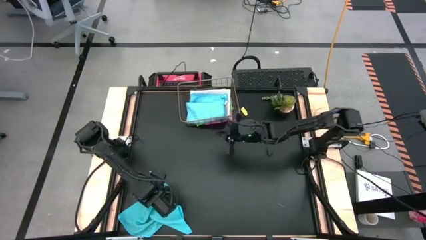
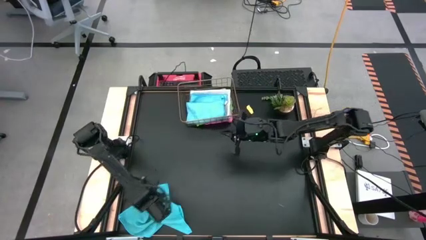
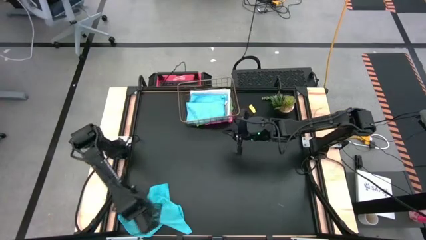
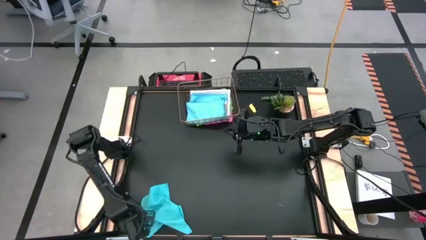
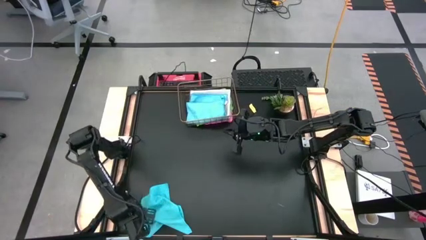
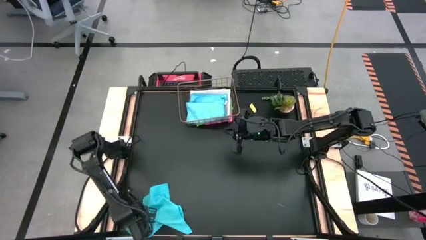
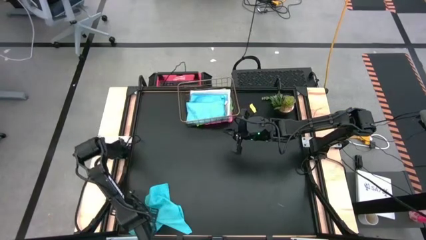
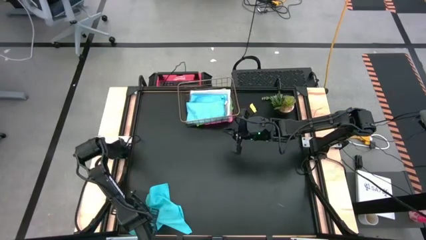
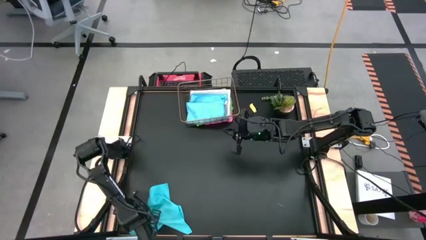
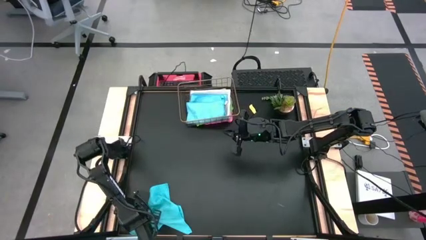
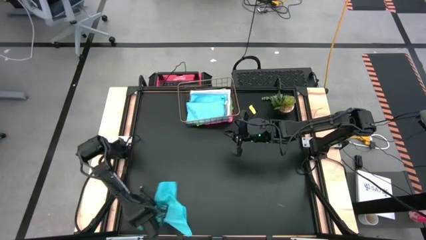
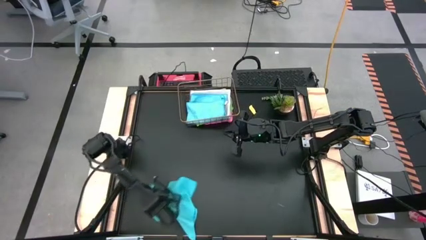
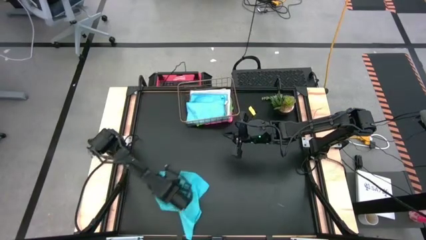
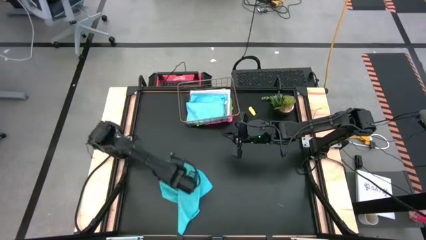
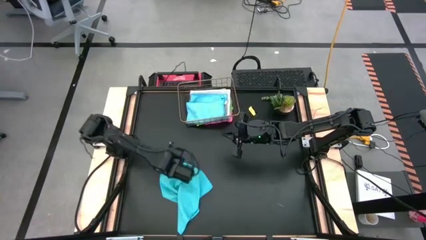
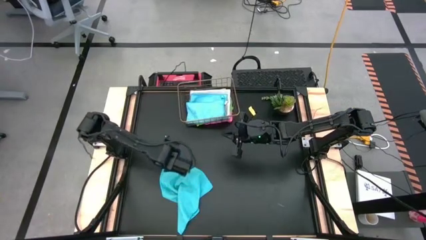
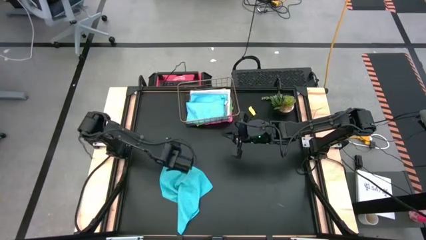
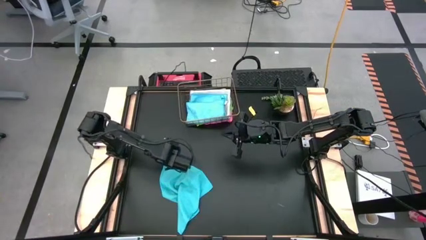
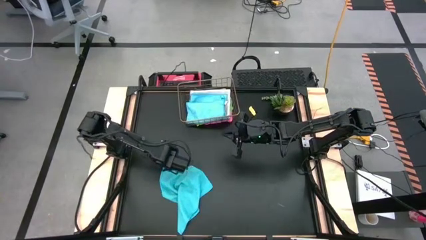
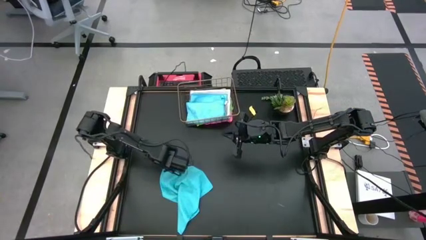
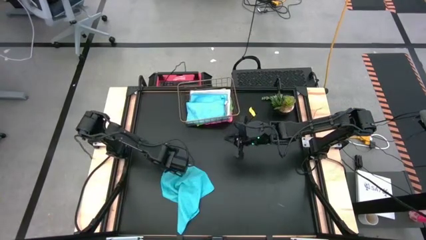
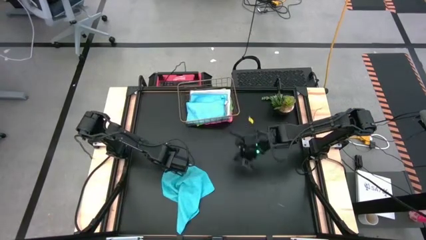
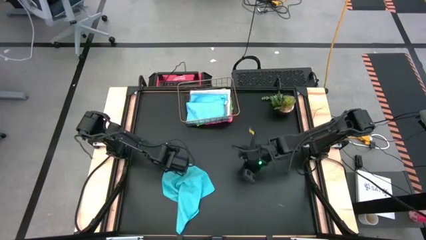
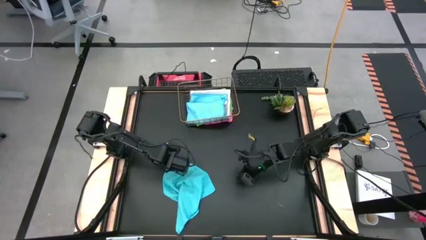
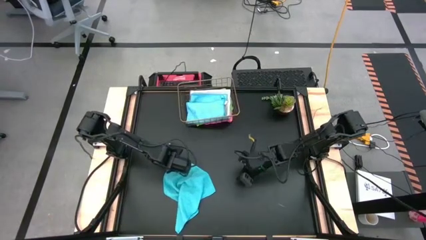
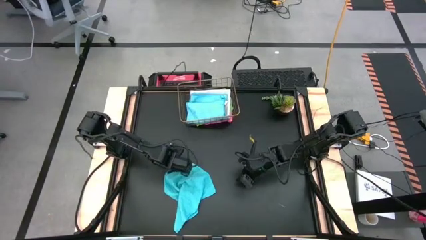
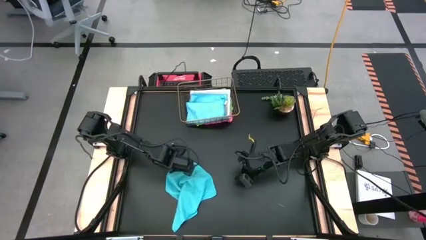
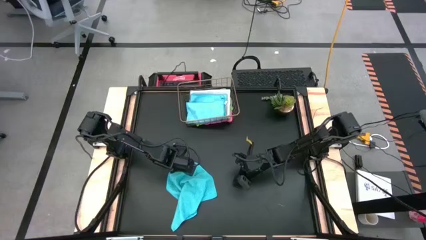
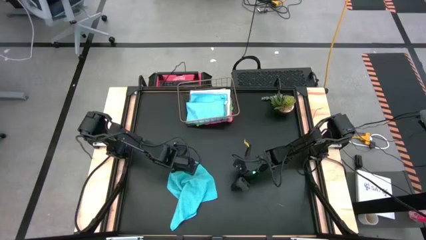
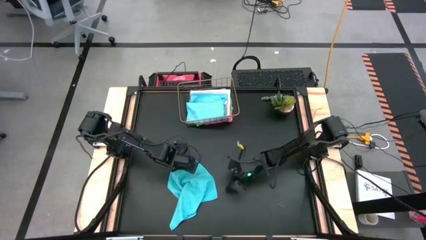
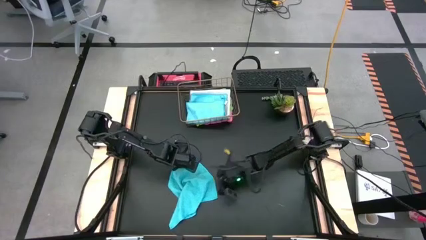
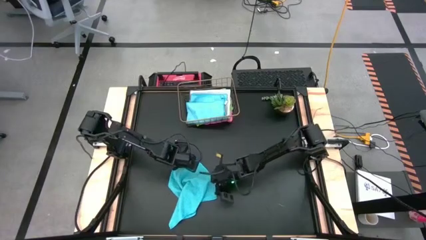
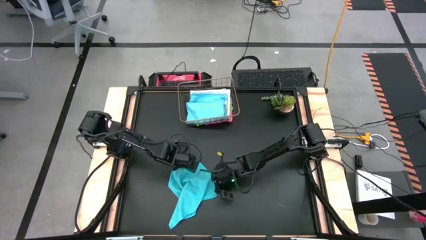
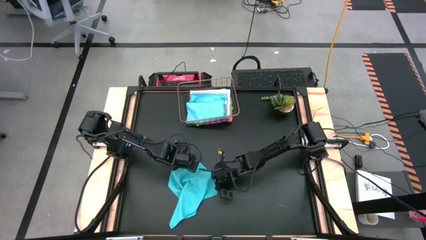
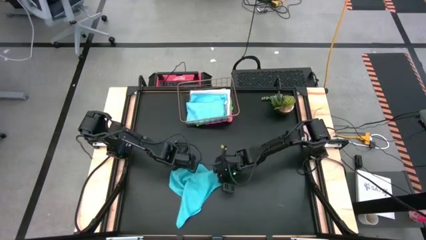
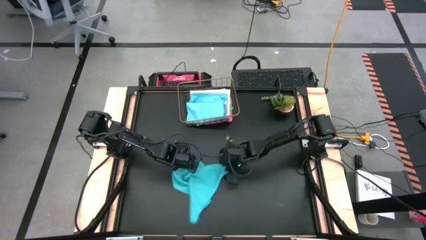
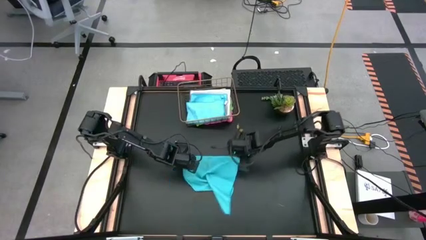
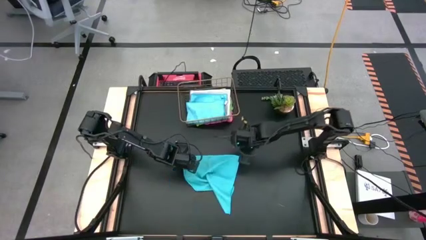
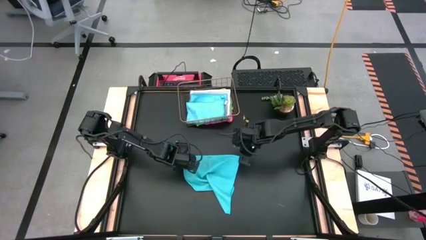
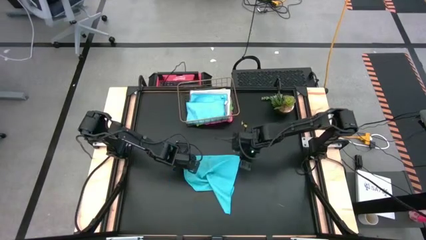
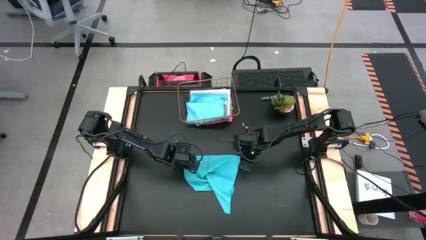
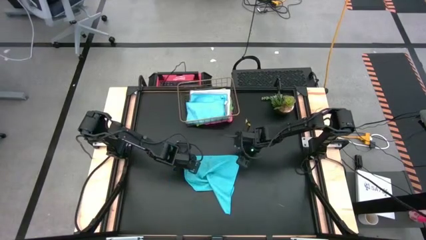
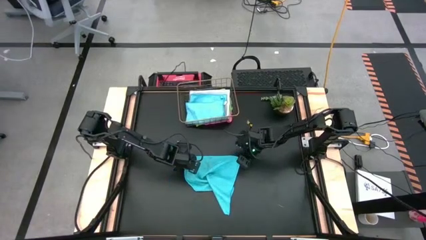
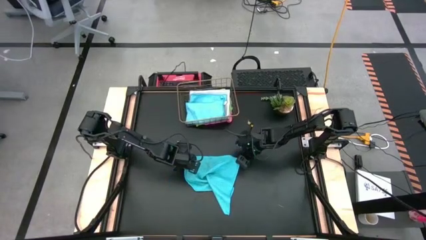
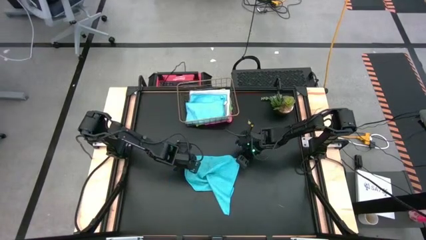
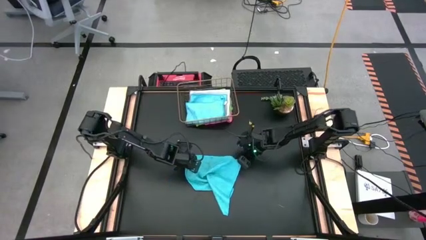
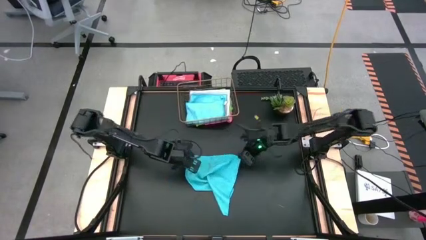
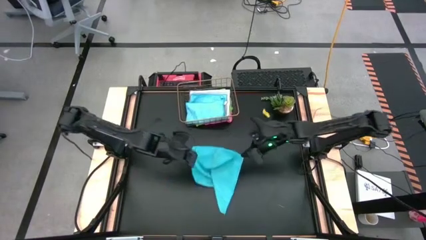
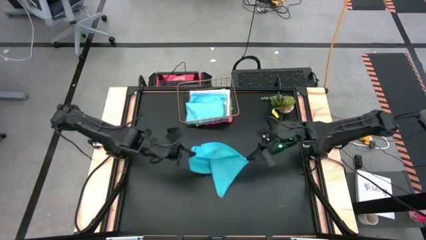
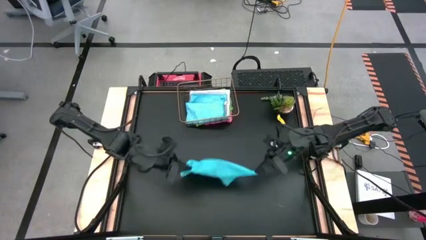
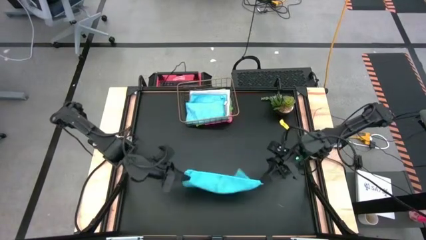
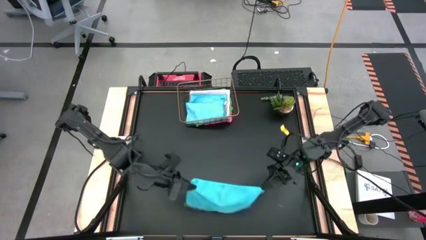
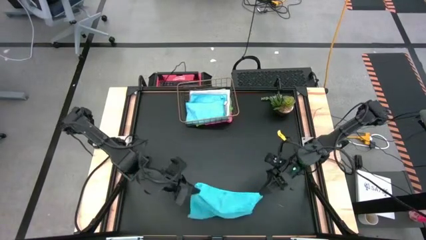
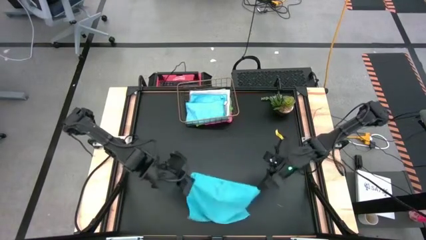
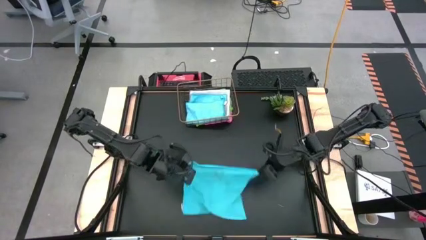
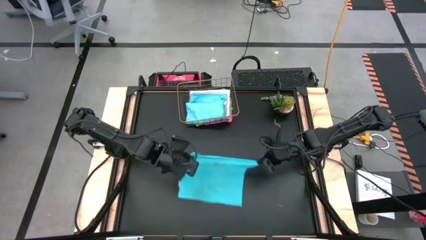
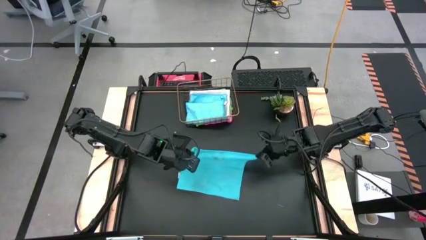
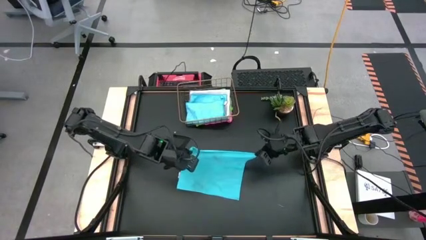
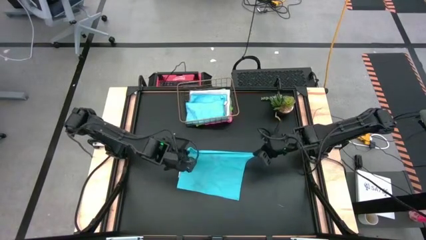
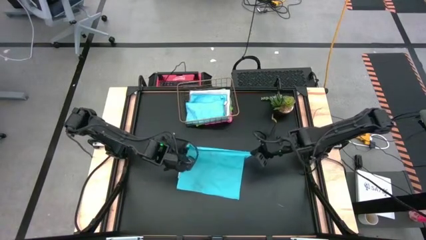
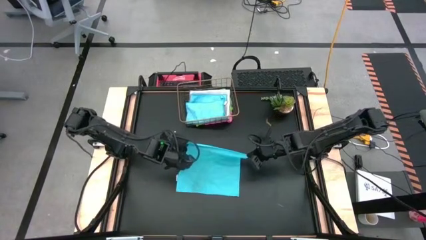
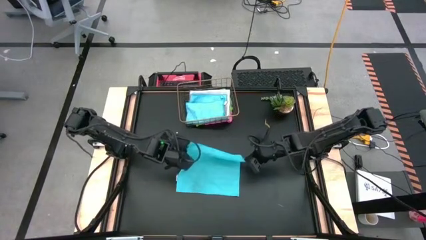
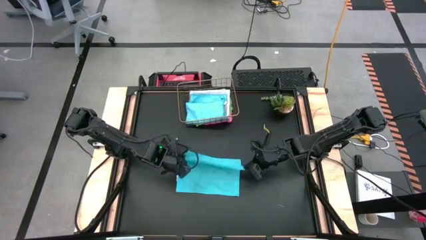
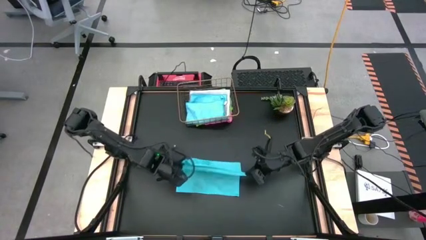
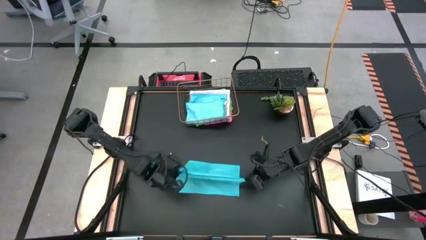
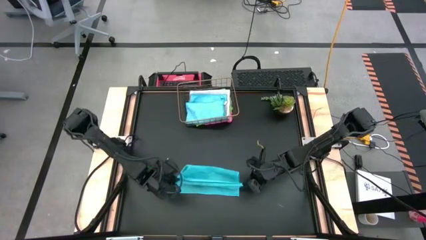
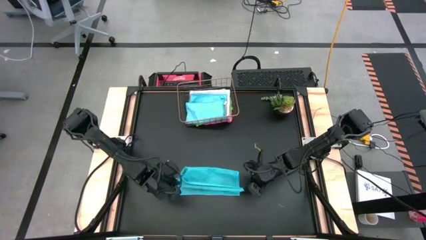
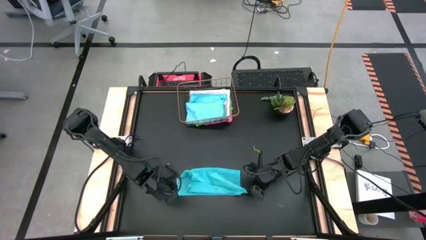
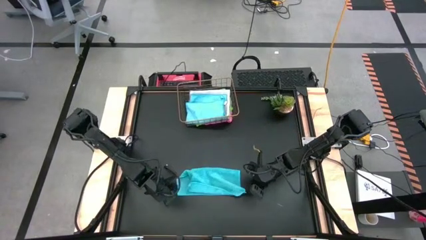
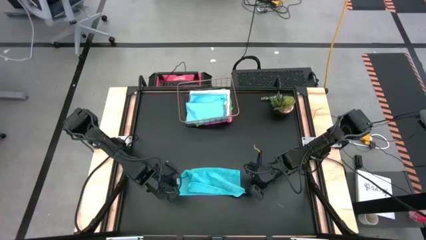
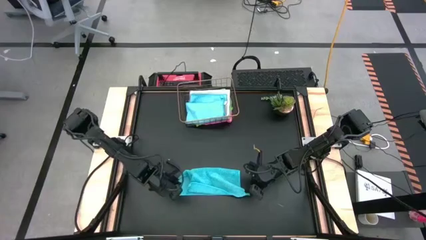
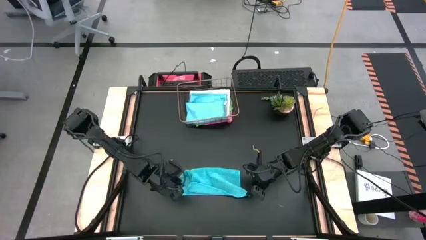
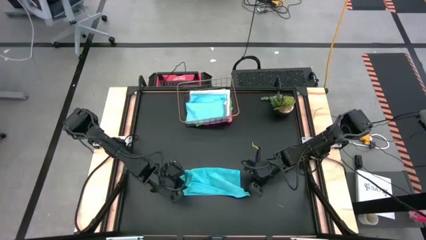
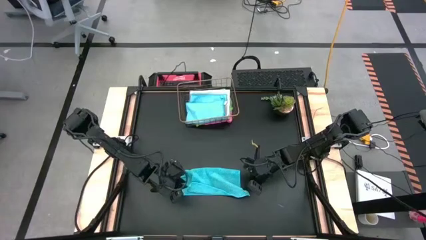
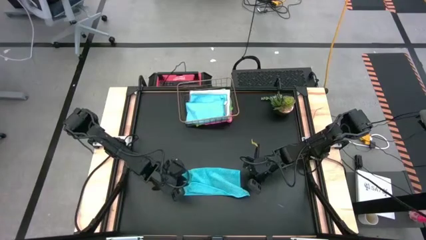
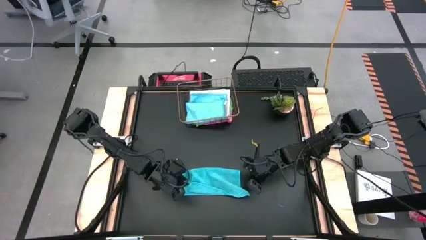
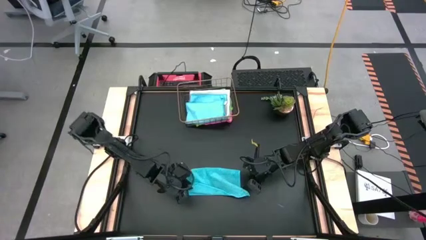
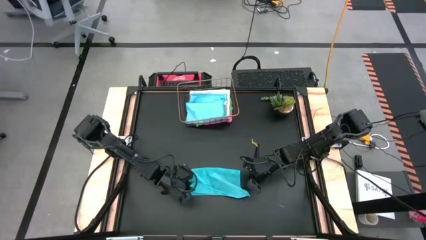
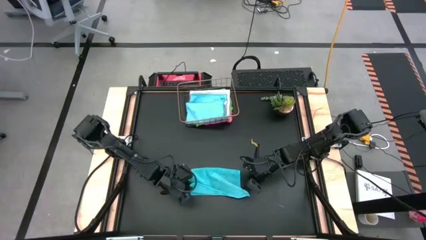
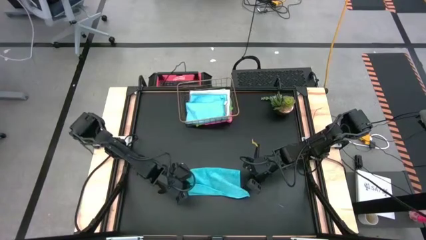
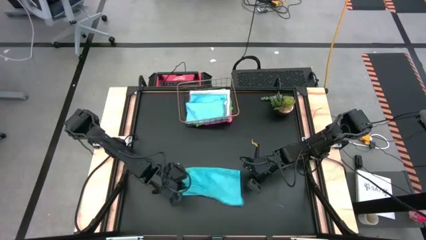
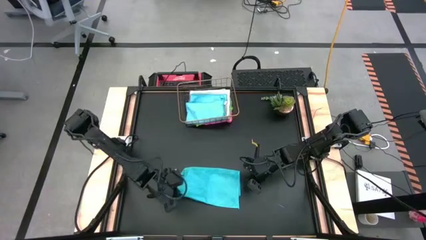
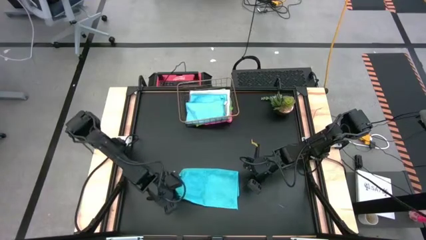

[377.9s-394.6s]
Task: Fold microfiber towels
Fold the light blue microfiber cloth in quarters
